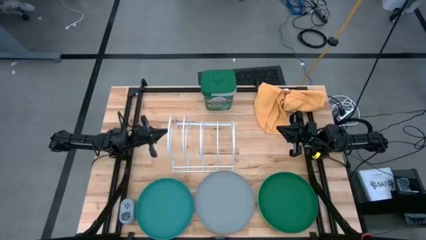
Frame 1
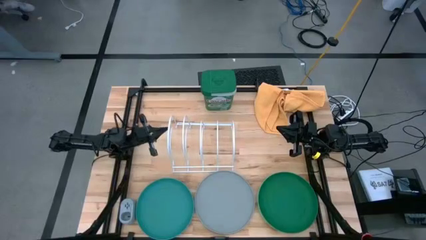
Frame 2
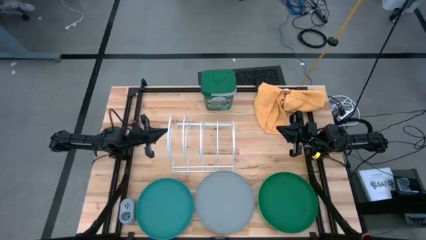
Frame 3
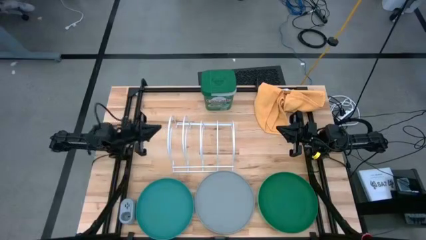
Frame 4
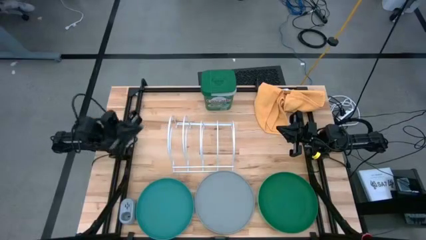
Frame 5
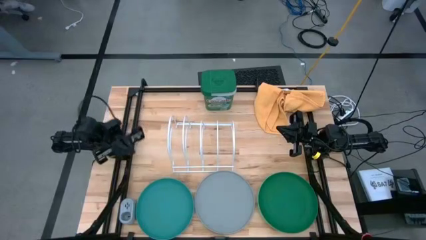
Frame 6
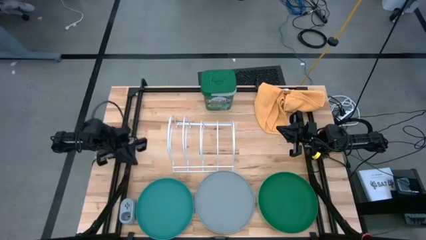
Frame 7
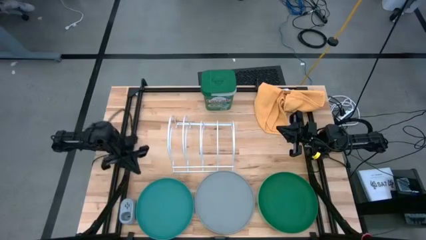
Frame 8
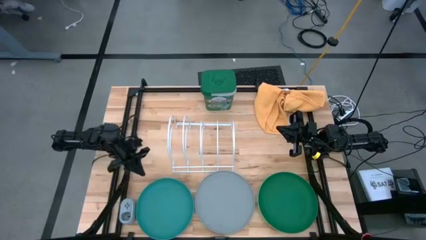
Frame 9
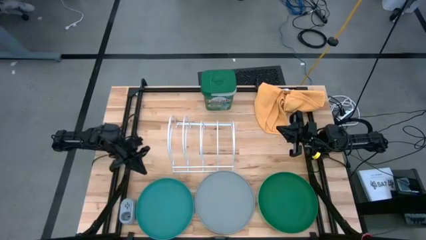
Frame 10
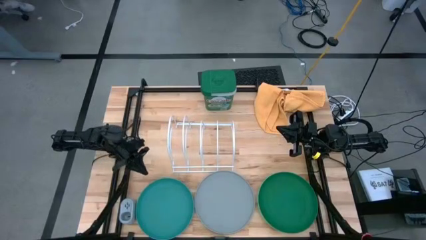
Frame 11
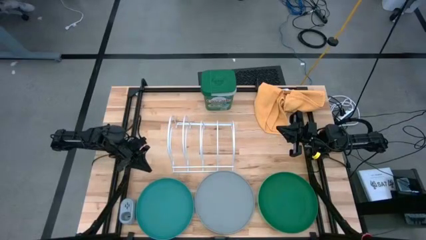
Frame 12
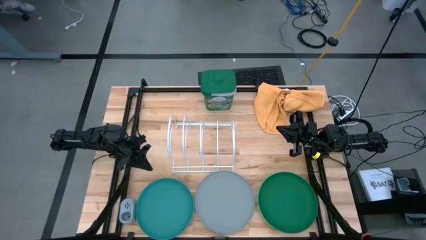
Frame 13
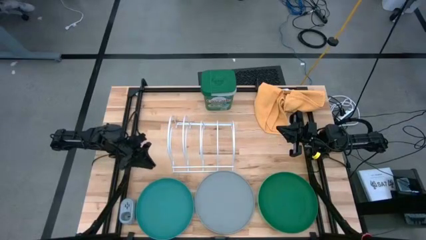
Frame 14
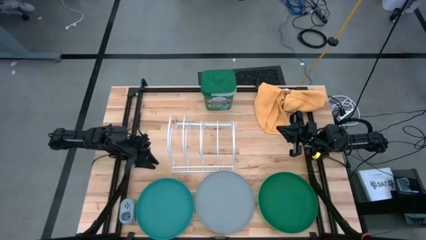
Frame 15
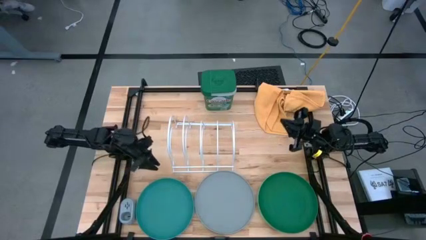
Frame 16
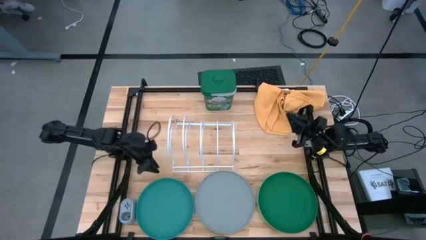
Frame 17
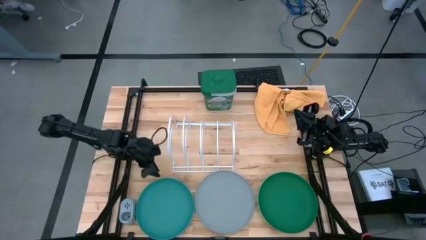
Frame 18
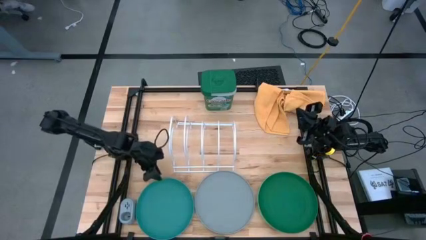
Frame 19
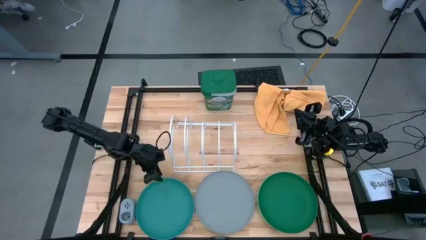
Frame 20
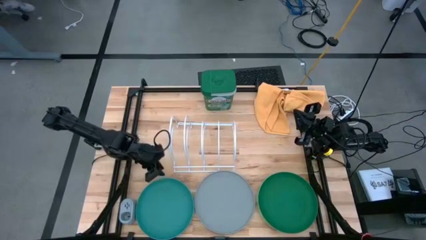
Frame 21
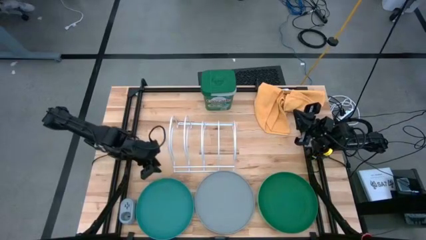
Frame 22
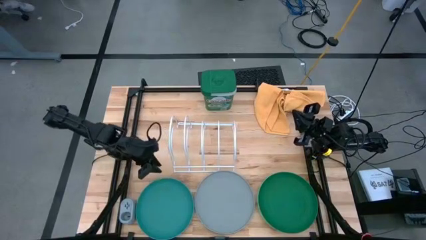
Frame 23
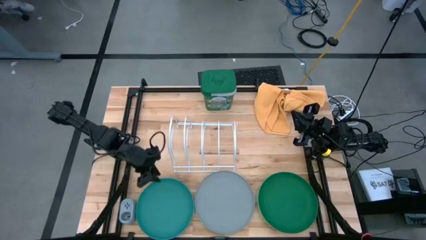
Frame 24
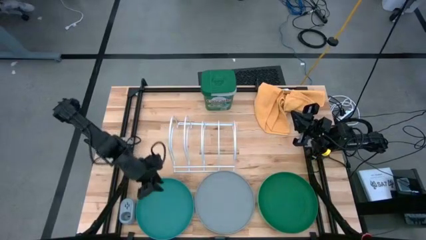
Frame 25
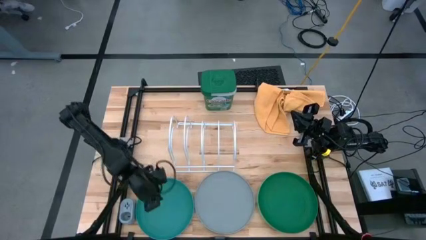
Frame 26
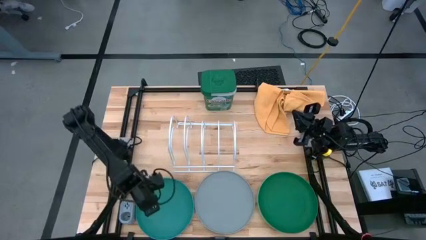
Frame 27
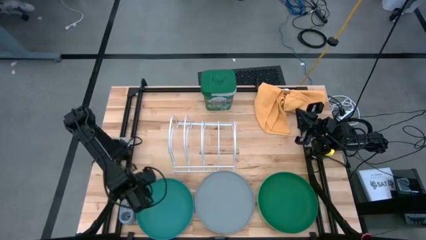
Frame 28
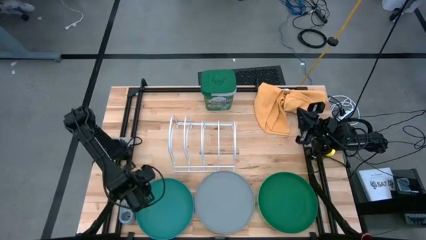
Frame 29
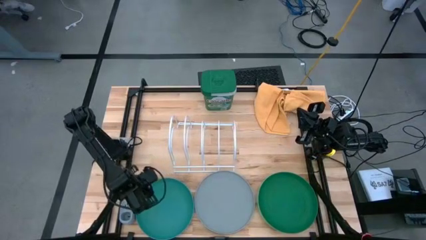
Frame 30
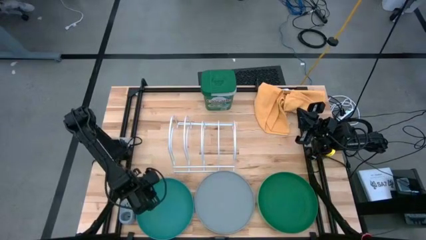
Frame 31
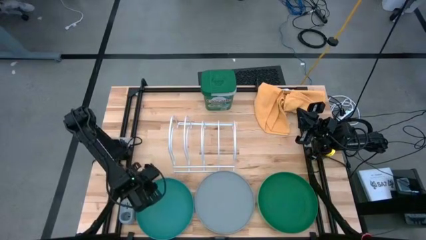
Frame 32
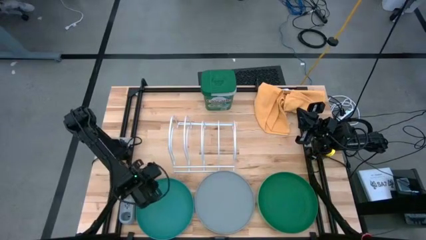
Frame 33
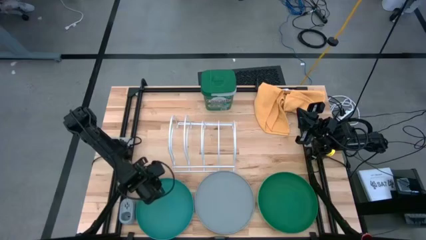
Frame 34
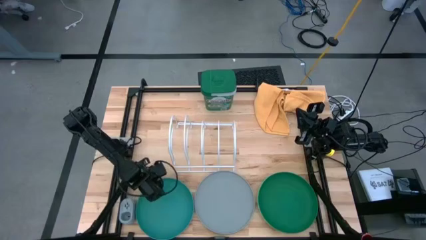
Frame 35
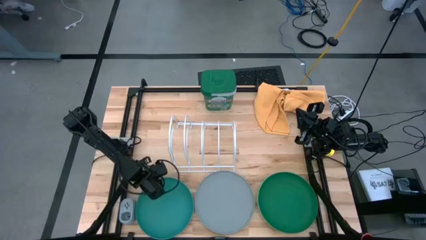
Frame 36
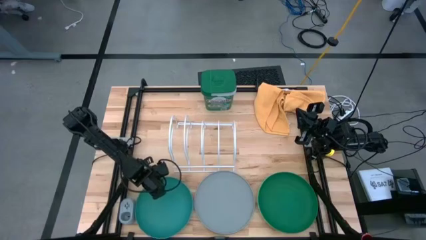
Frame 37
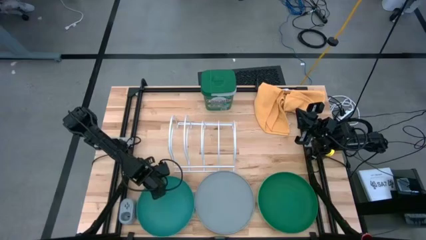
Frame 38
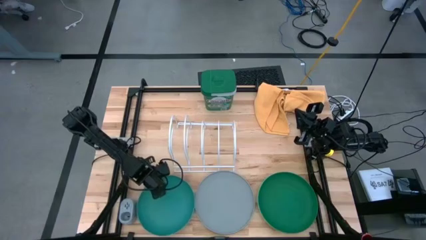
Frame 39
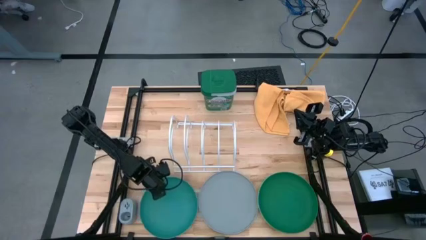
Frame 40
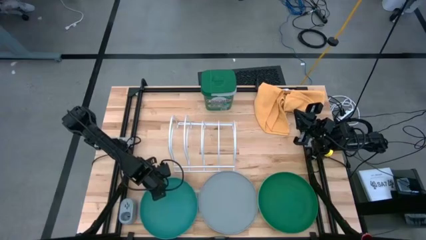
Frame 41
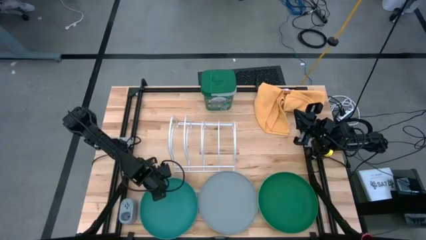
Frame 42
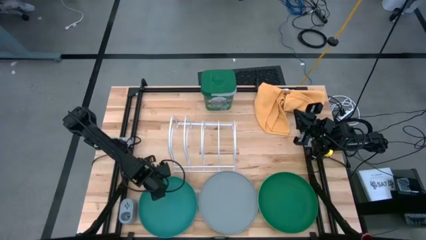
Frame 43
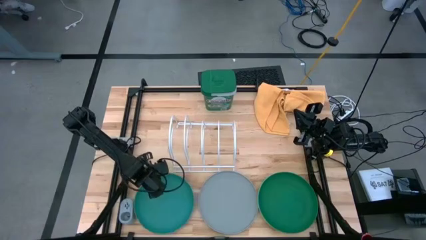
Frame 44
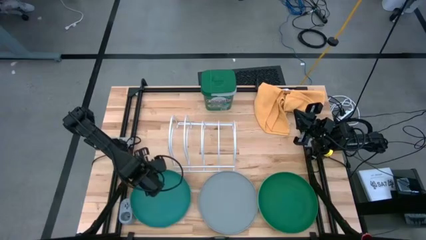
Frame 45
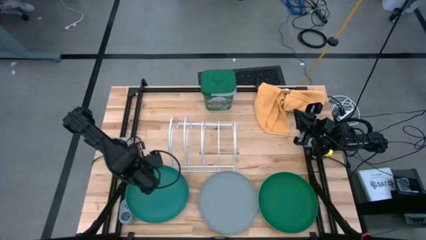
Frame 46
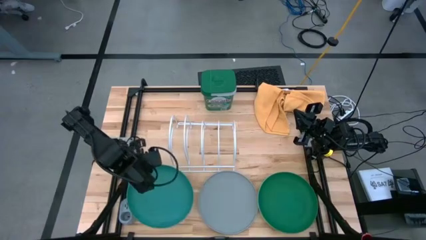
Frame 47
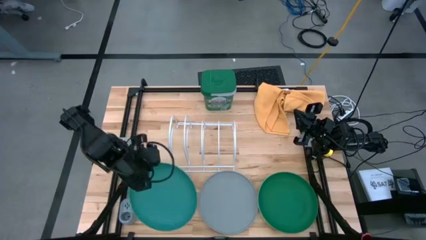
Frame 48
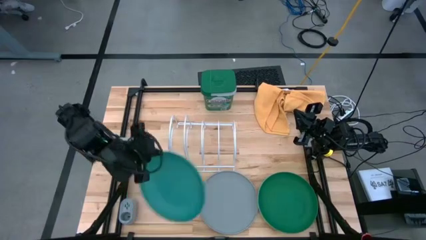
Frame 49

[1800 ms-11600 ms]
Task: Sort dishes
Put the green plate into the dish rack

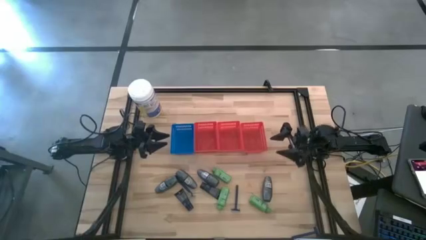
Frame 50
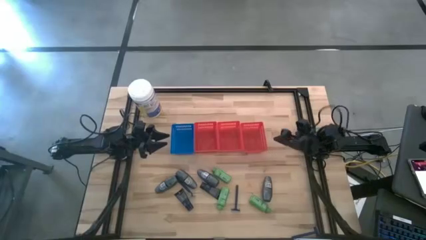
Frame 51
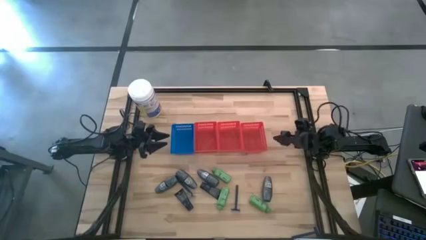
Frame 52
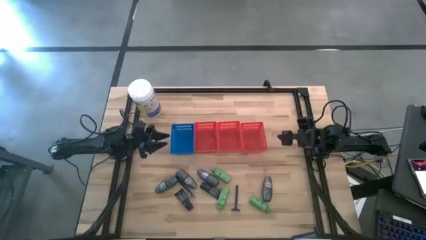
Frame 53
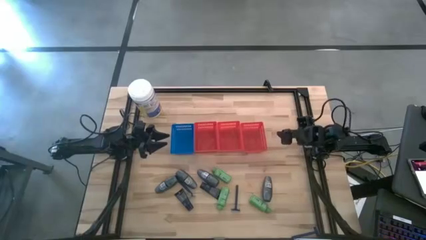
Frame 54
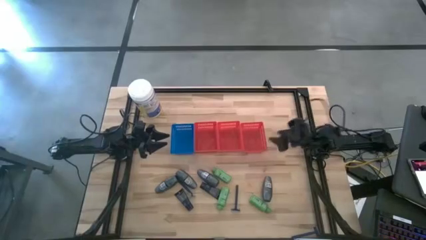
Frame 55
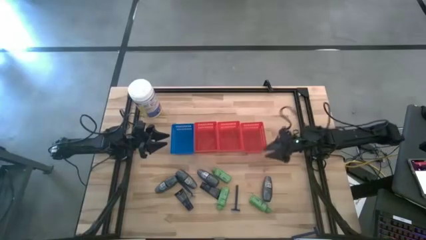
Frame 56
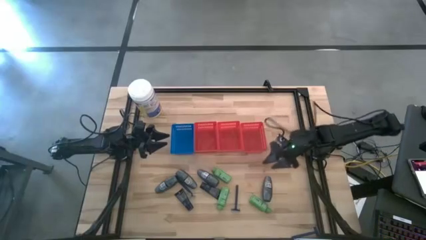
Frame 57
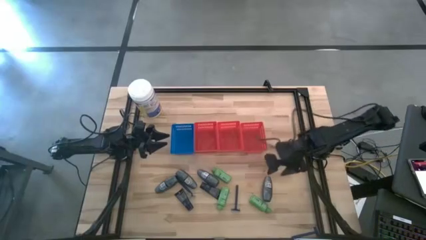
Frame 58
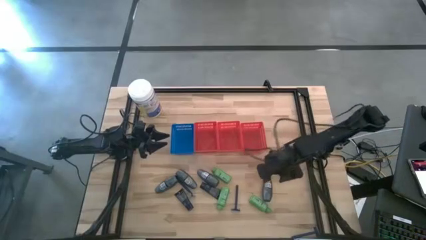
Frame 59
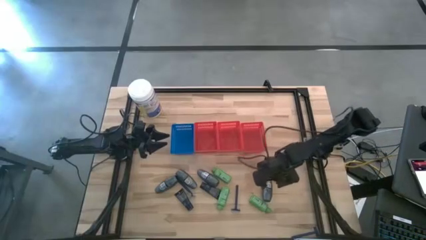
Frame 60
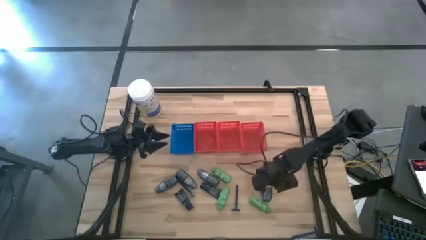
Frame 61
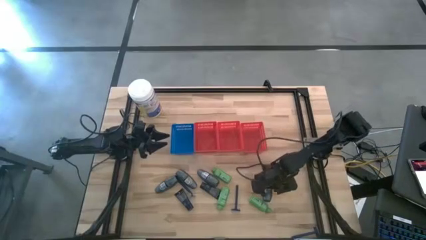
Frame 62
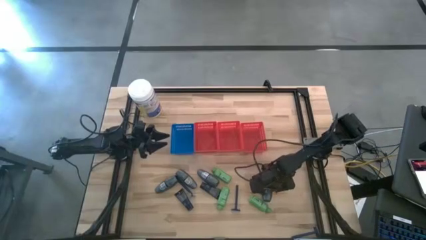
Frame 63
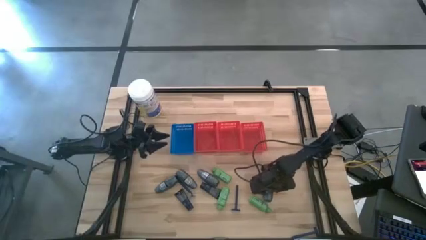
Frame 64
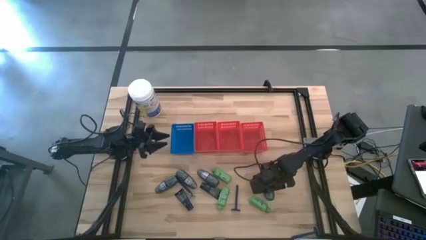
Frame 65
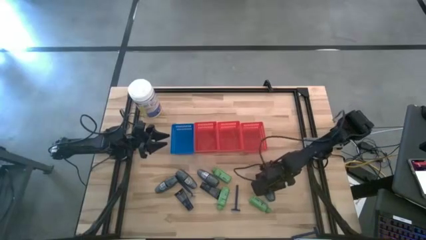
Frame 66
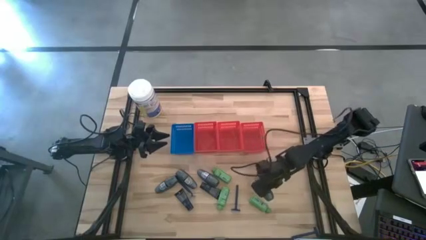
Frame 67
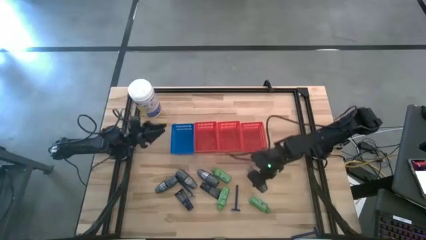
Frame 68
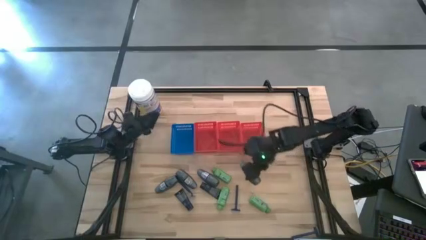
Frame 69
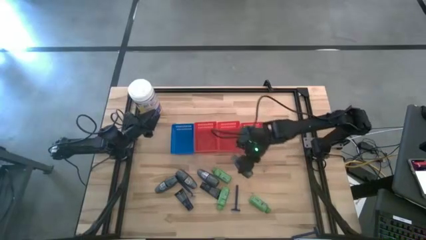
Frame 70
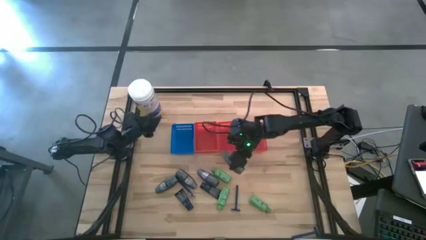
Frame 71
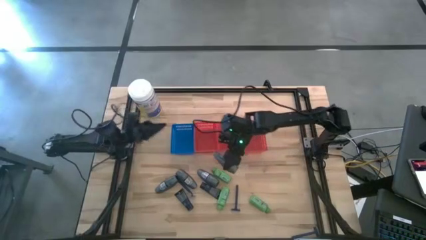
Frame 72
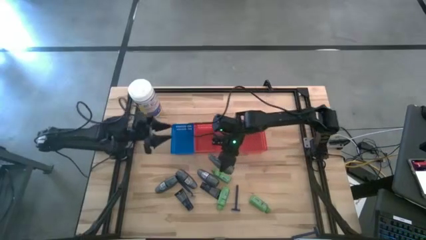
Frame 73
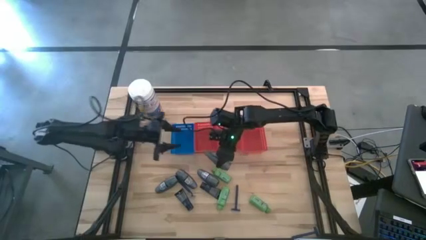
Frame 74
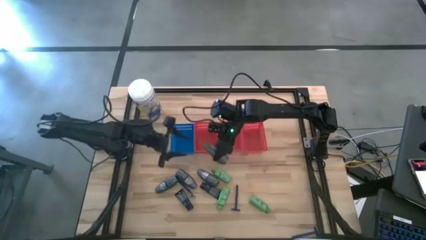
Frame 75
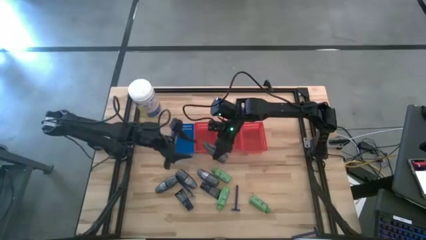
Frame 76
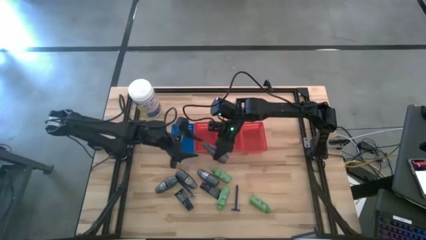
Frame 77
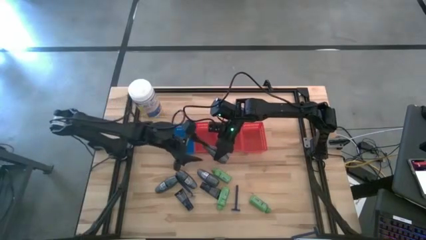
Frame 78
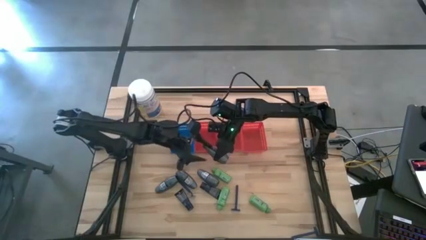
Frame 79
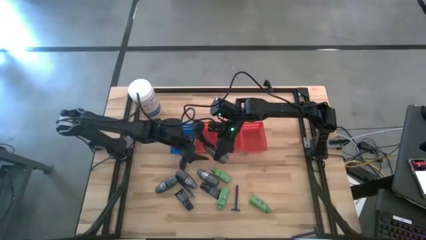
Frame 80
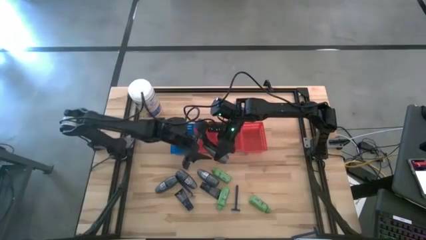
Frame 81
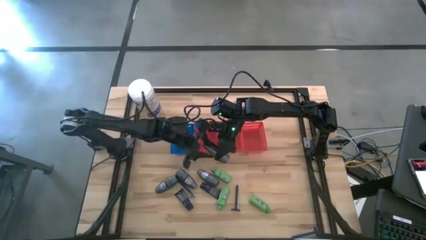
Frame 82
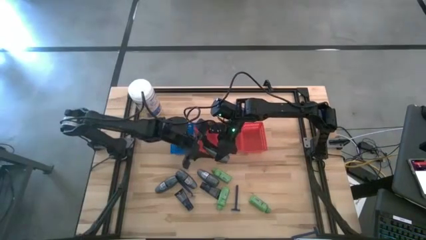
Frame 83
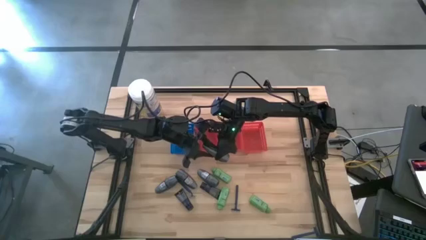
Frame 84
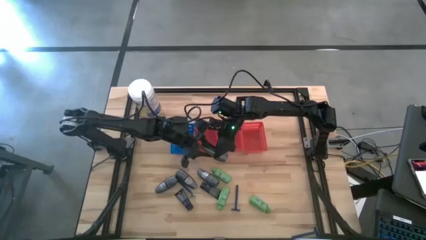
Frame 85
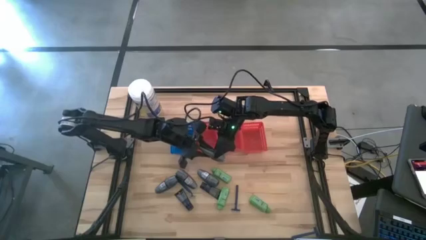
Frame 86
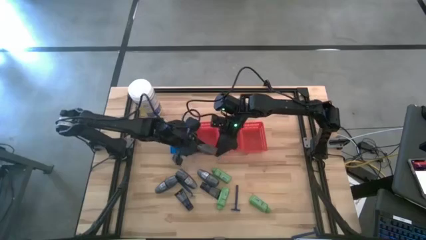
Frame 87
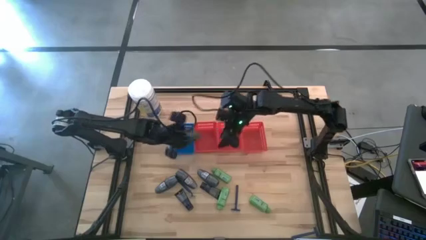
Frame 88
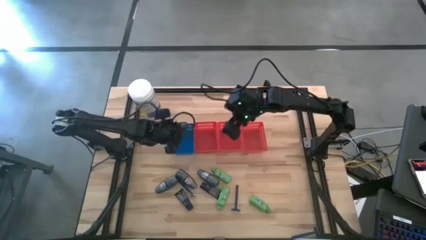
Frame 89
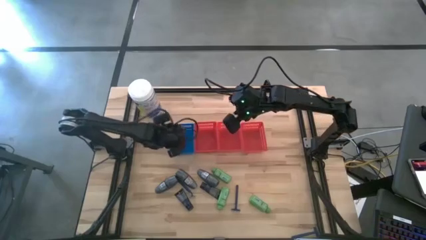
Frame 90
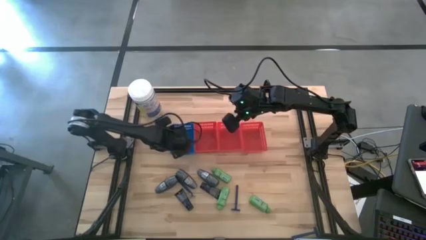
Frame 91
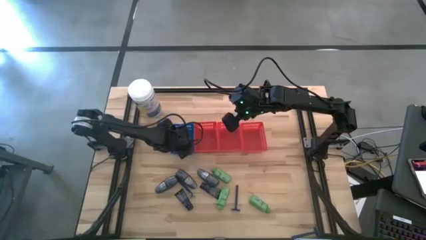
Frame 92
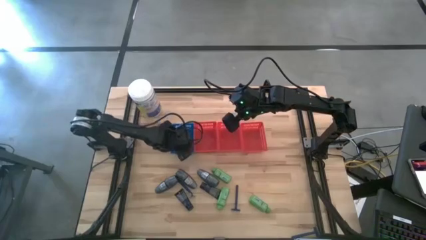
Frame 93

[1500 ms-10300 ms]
Task: Pick & Place Travel size toiletries
Put the deodorant into the blue bin
